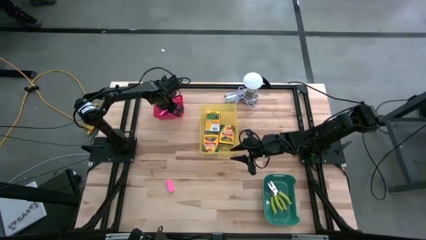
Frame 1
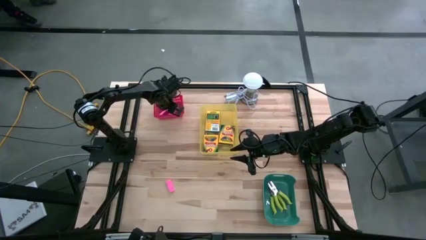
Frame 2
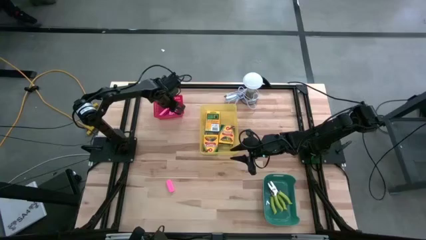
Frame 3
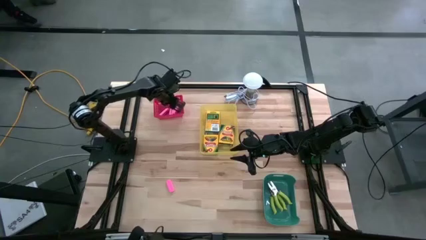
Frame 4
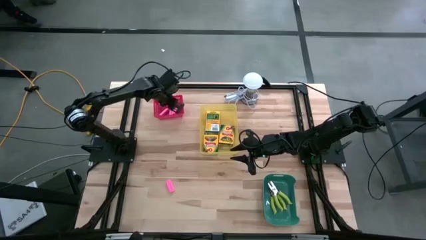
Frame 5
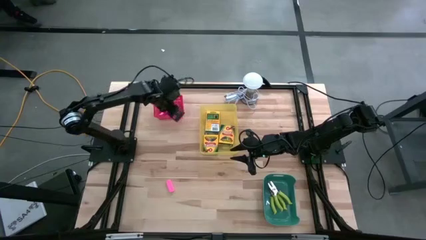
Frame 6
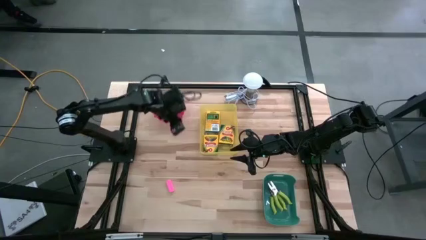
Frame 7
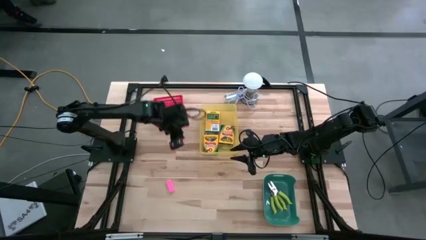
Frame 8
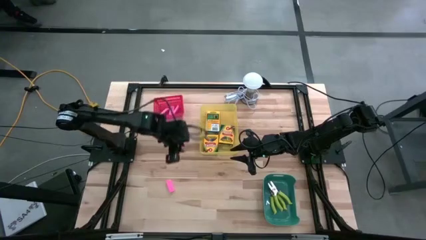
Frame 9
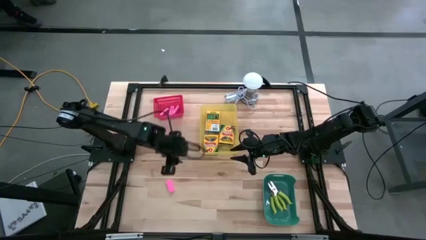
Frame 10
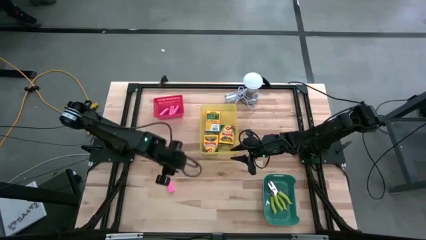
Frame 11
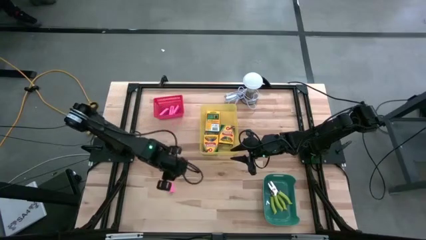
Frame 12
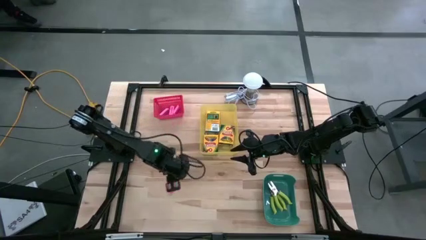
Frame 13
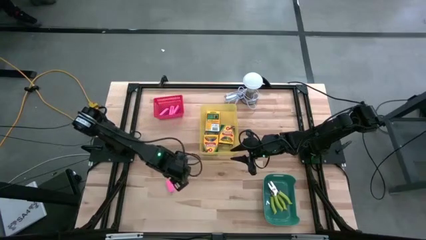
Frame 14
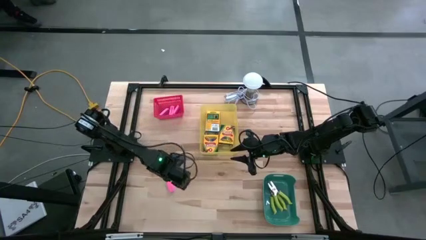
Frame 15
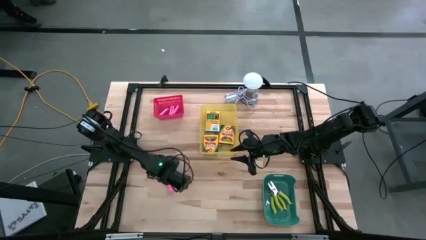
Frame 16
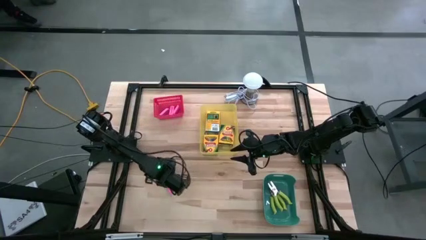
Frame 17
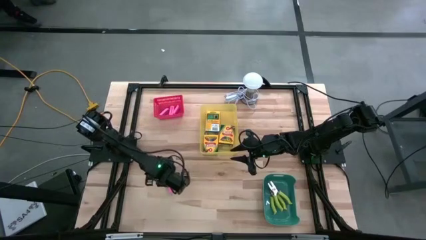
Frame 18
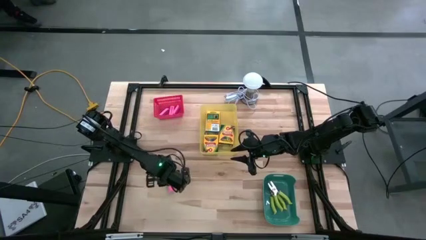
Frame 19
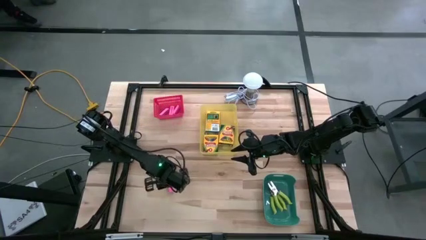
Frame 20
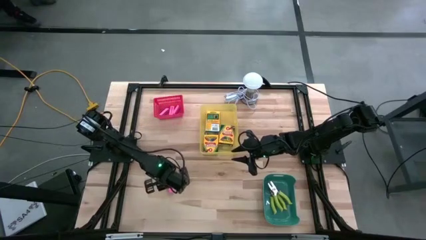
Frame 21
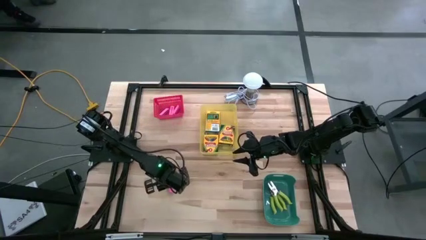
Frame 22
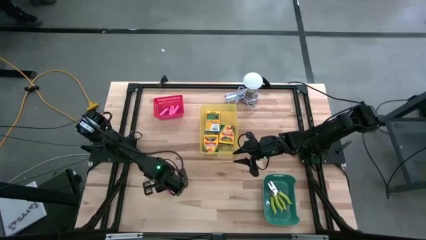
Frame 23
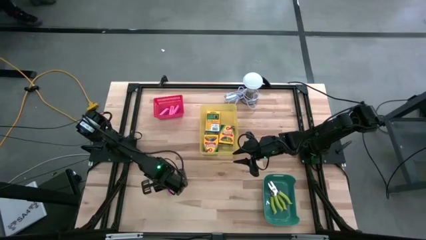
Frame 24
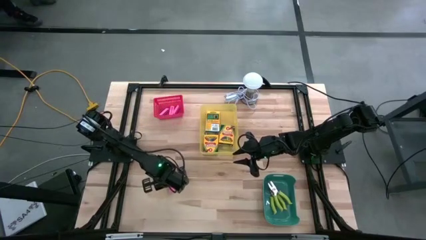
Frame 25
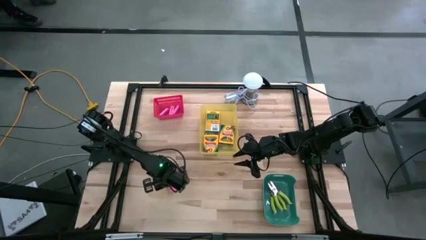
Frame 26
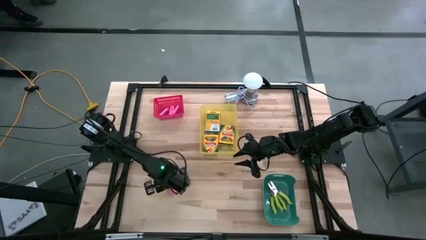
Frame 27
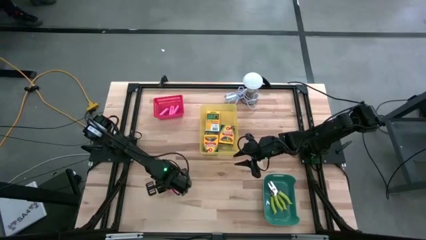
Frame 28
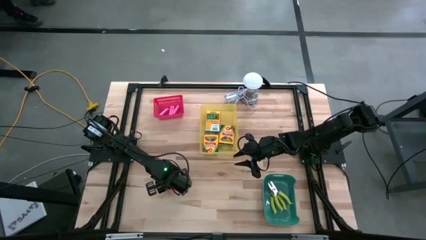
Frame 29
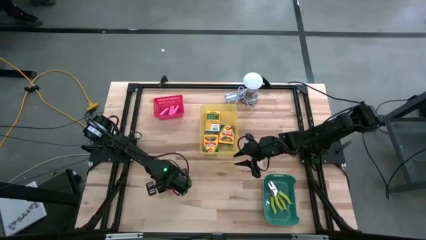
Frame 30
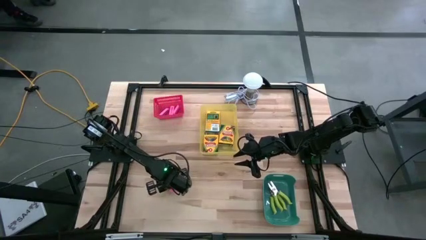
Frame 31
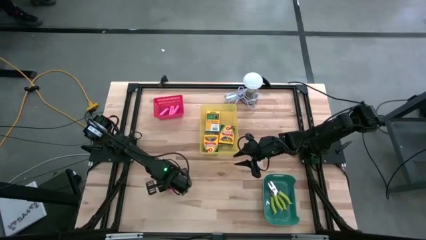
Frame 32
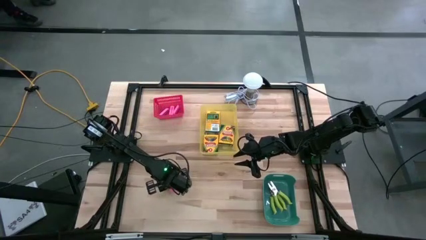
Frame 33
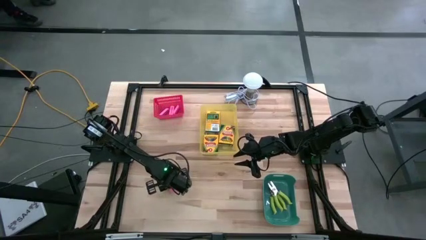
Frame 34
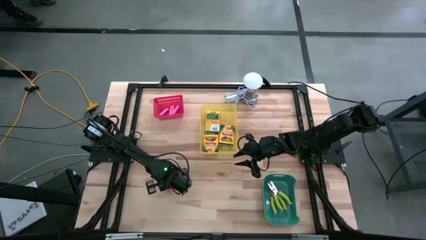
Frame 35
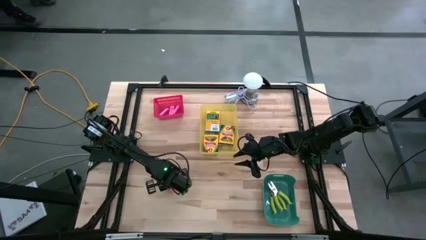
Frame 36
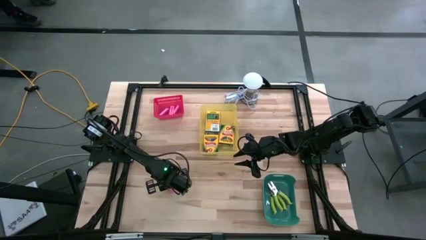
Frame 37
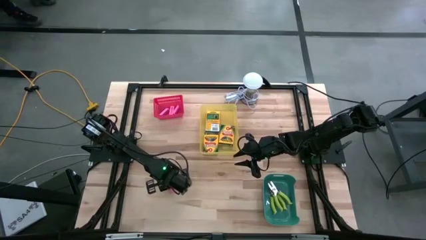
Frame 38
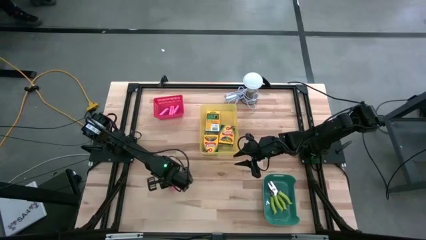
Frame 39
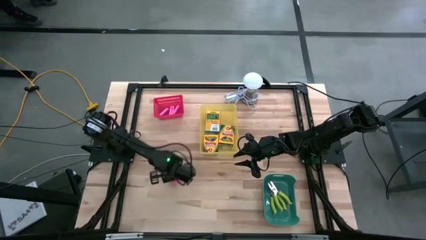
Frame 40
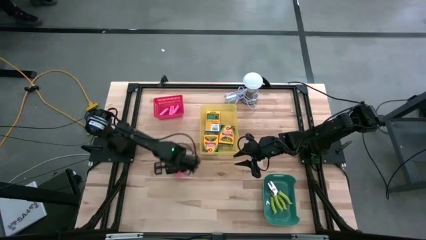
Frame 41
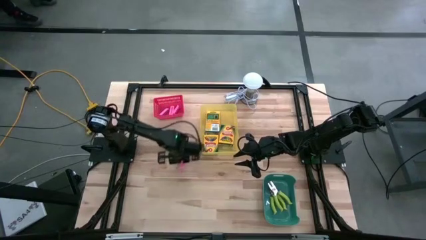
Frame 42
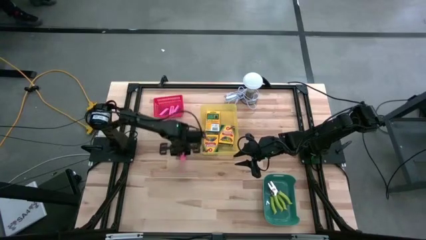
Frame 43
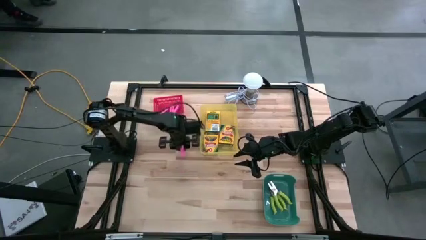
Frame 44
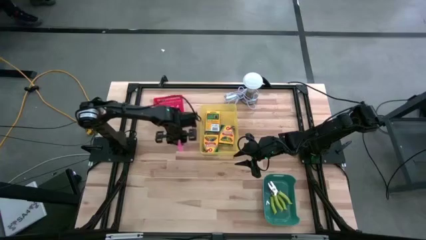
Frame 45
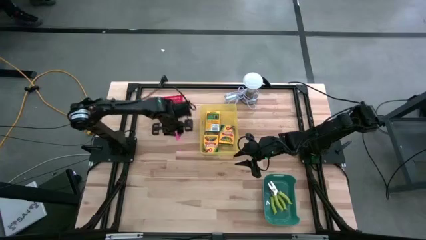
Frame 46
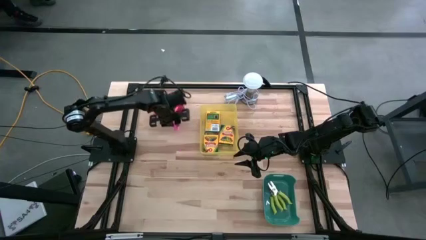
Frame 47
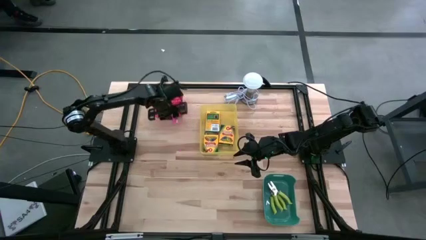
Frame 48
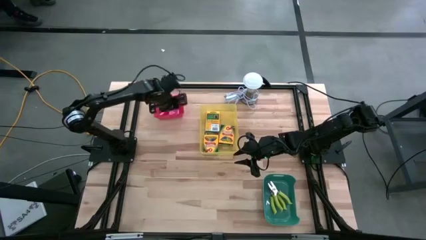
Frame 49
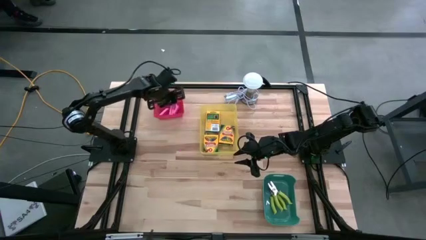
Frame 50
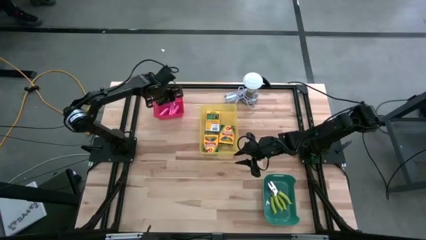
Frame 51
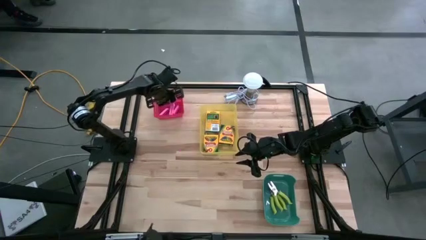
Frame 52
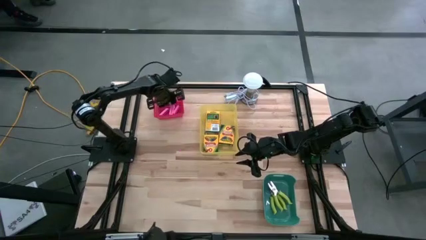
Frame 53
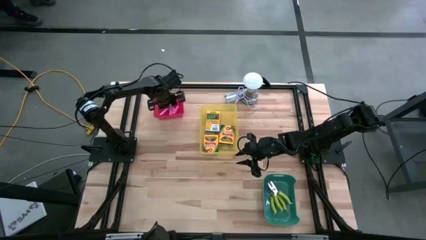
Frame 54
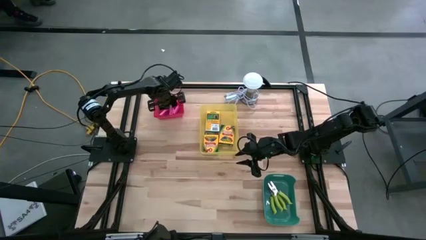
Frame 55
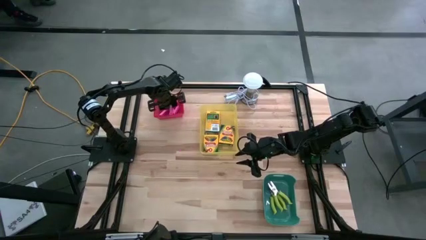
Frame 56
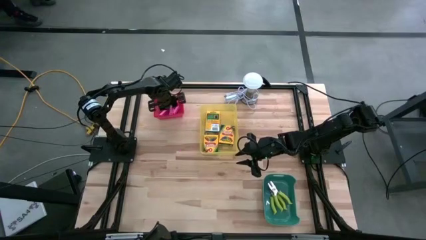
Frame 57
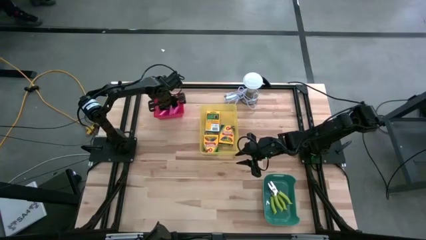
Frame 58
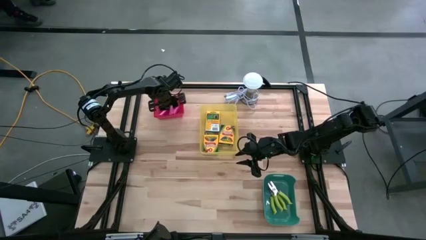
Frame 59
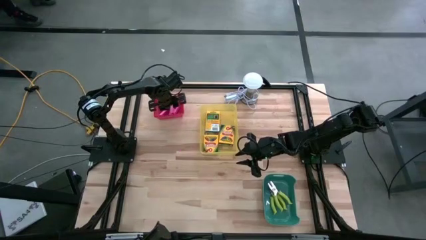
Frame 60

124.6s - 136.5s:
Task: Pick & Place School Supplies
Put the pink eraser into the red bin

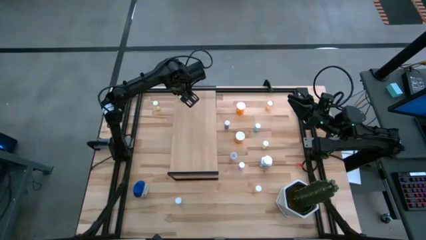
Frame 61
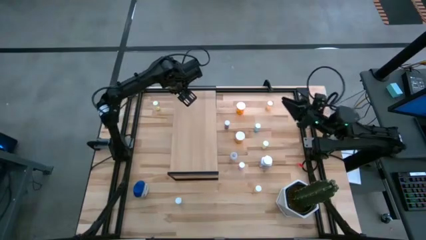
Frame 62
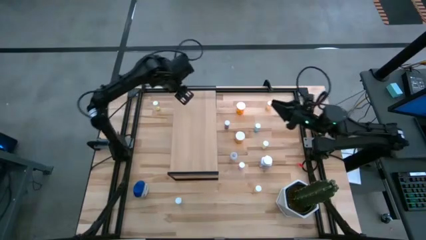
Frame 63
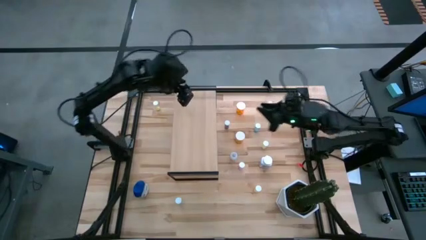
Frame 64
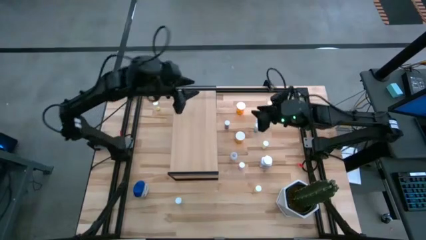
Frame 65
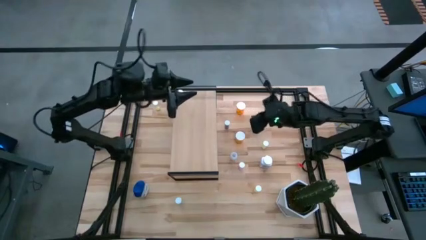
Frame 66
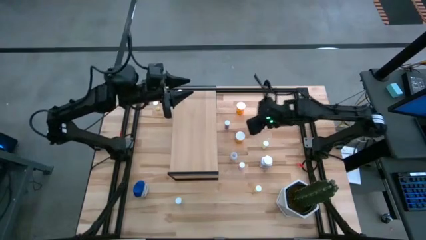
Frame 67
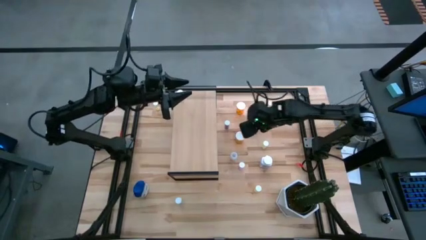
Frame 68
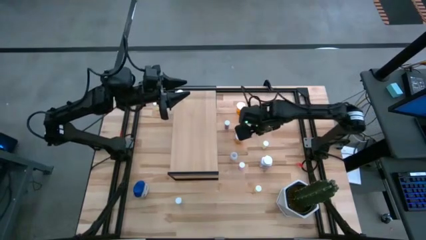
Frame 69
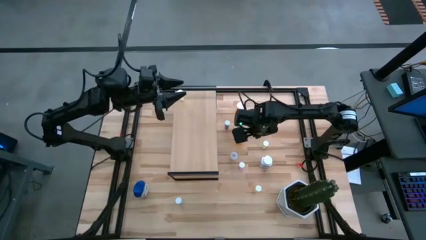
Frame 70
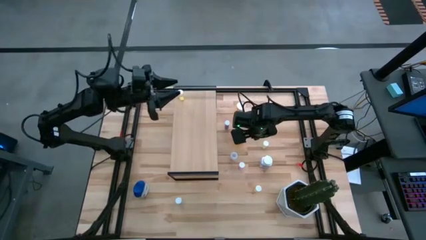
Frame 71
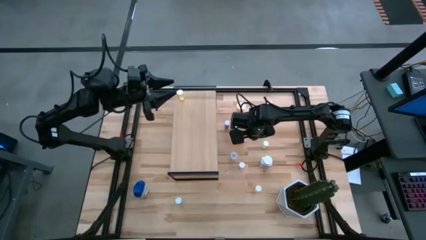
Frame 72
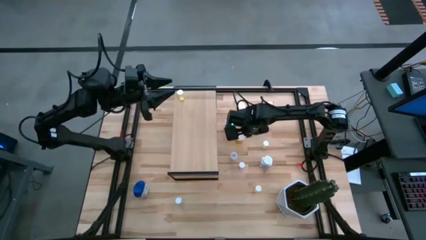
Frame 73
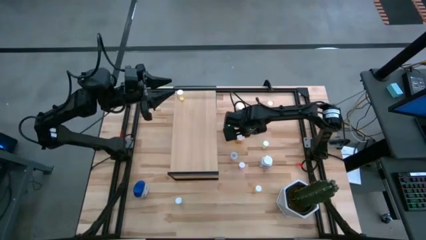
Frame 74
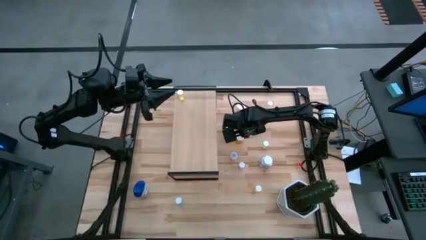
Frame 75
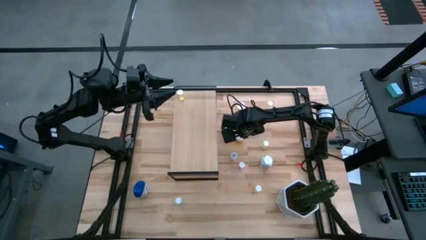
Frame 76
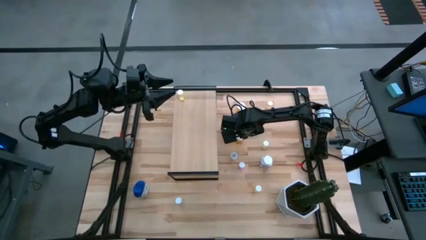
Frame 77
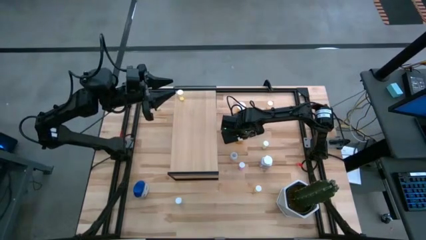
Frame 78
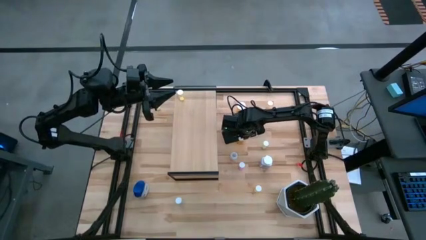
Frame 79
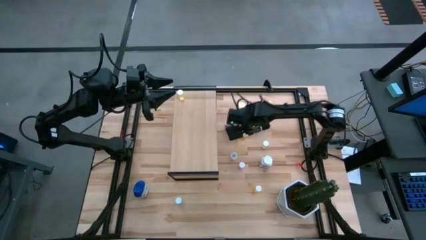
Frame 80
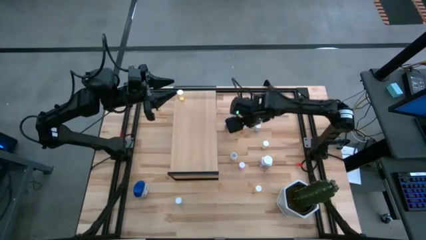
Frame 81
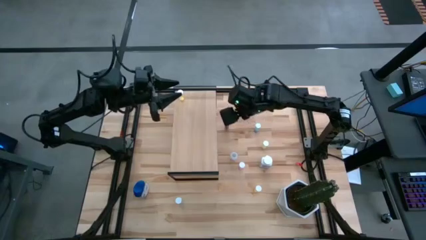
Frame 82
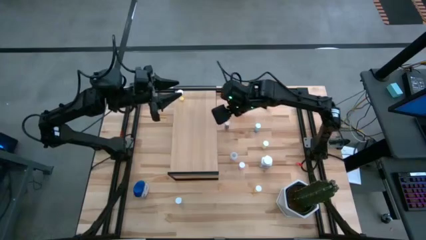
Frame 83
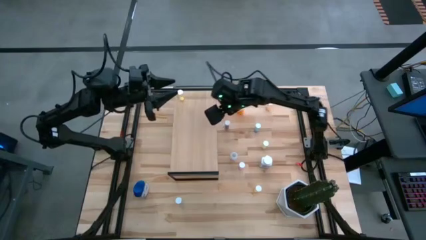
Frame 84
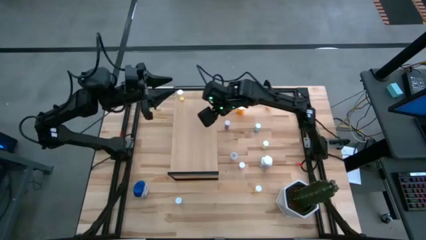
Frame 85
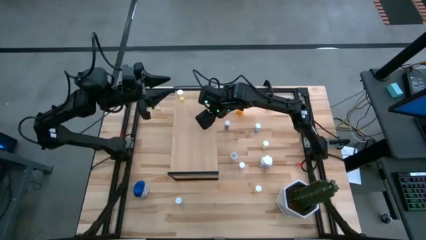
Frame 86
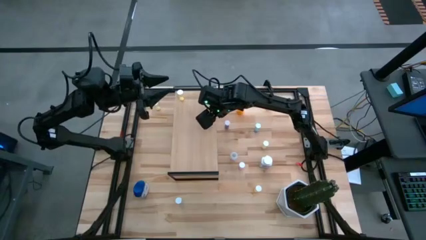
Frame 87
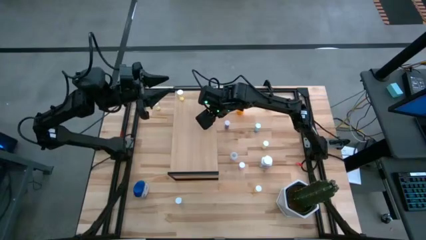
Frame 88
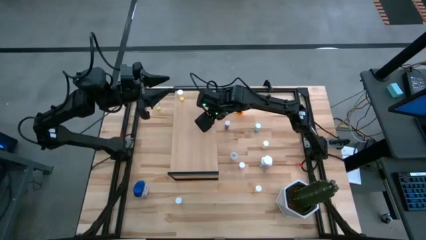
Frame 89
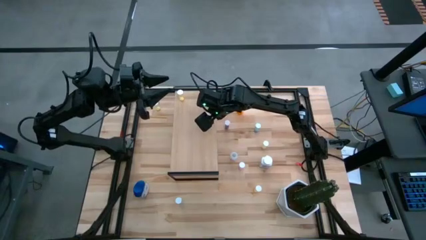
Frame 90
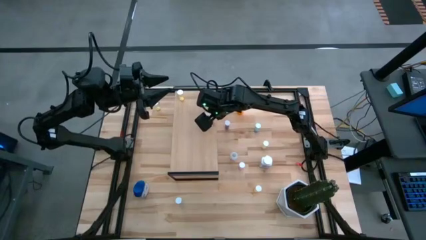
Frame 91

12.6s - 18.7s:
Task: Pick and place medicine bottles onto shelf by color
Put the center orange capsule bottle on the shelf
